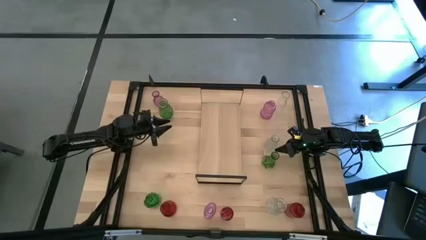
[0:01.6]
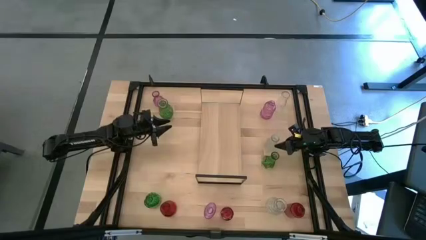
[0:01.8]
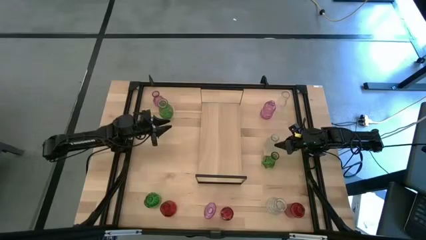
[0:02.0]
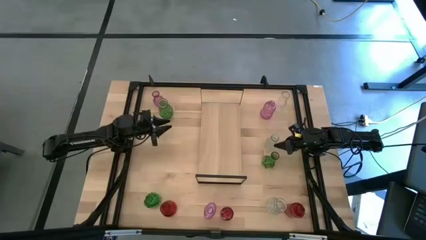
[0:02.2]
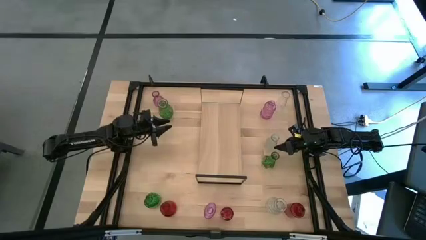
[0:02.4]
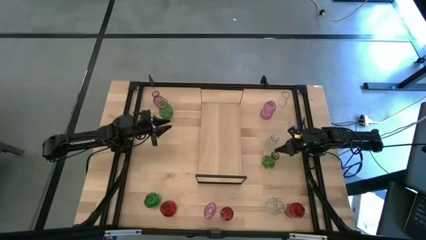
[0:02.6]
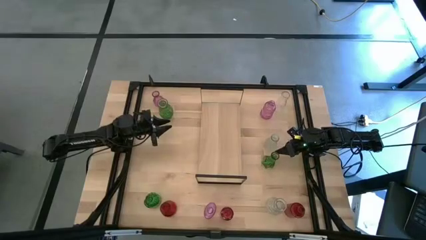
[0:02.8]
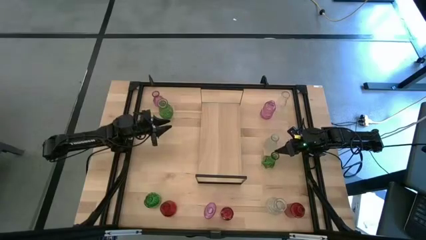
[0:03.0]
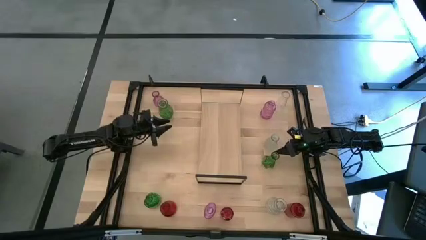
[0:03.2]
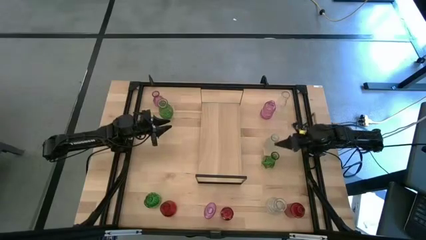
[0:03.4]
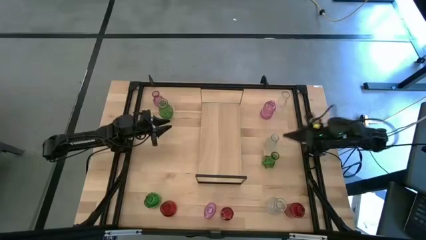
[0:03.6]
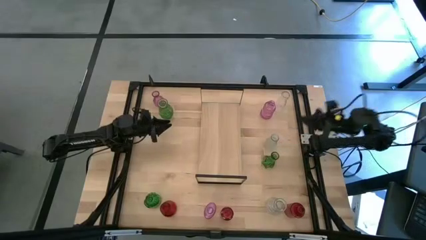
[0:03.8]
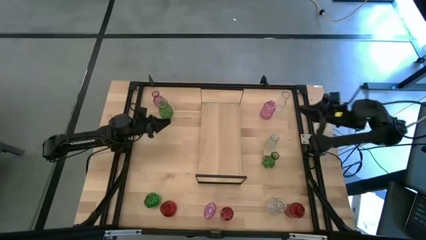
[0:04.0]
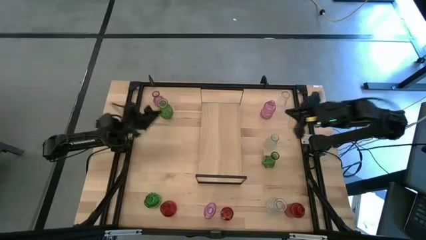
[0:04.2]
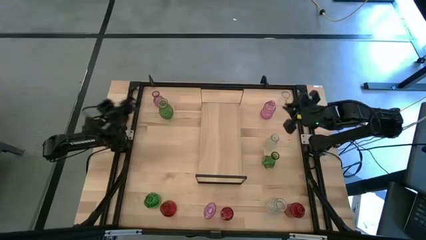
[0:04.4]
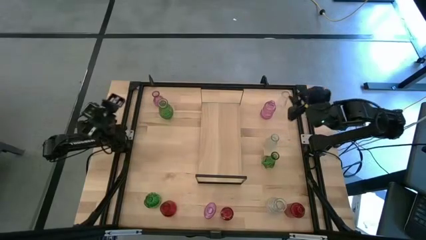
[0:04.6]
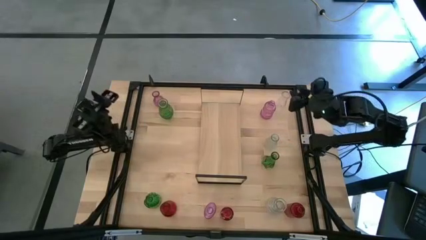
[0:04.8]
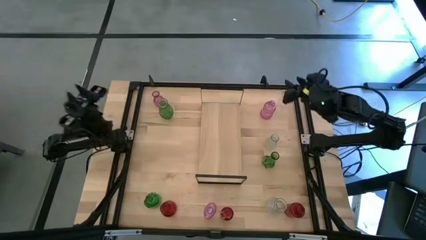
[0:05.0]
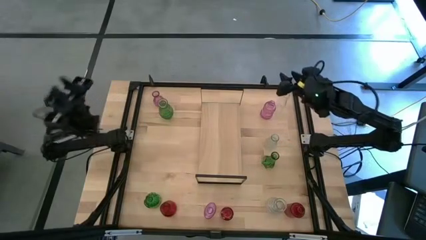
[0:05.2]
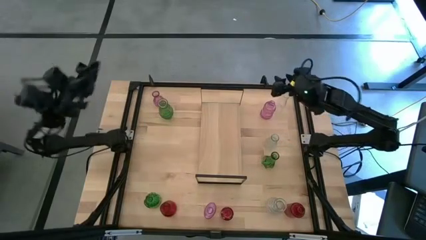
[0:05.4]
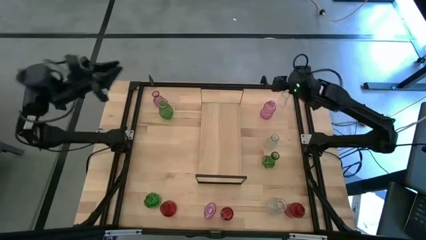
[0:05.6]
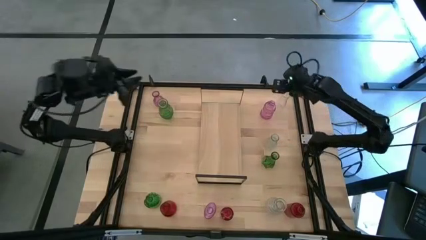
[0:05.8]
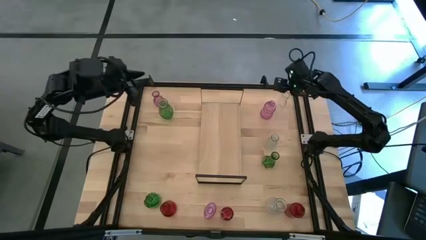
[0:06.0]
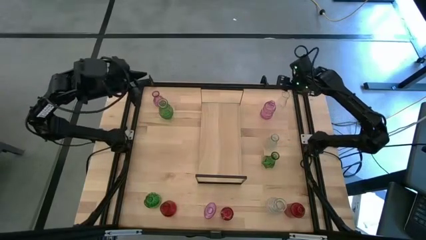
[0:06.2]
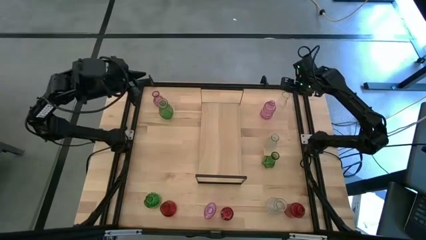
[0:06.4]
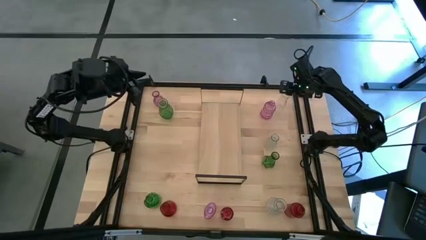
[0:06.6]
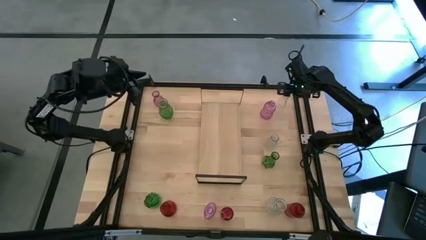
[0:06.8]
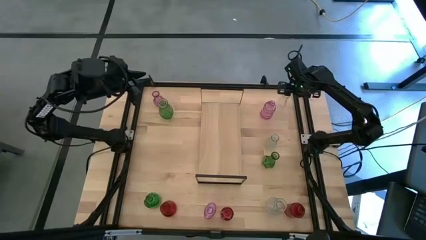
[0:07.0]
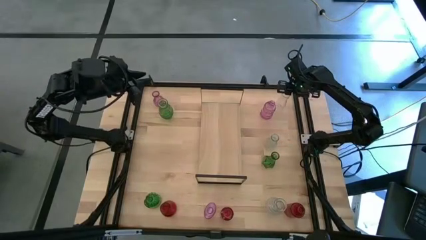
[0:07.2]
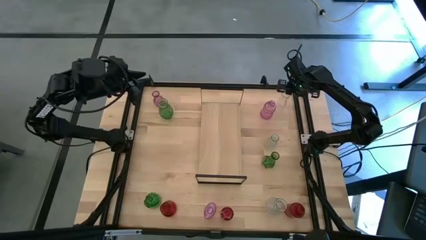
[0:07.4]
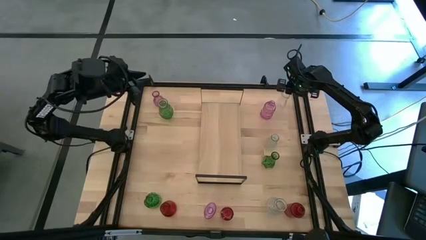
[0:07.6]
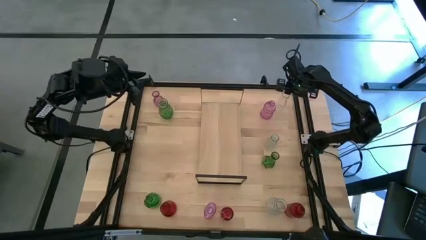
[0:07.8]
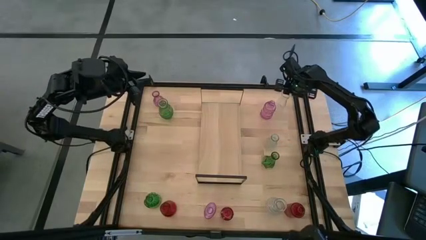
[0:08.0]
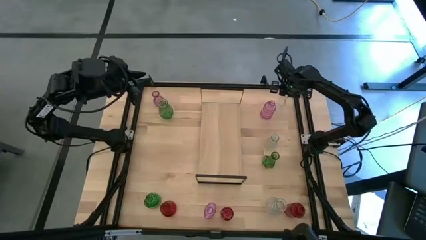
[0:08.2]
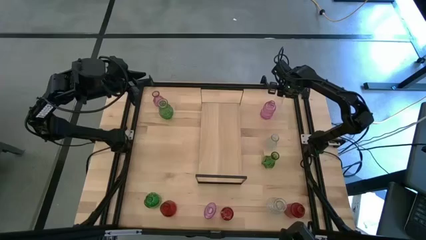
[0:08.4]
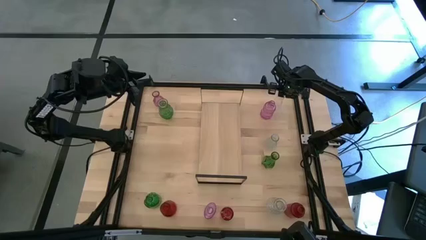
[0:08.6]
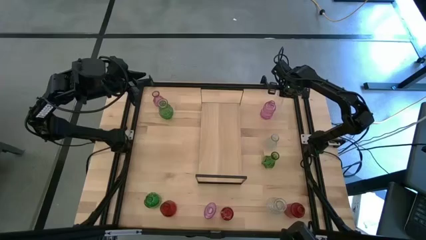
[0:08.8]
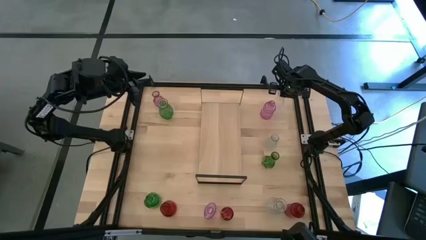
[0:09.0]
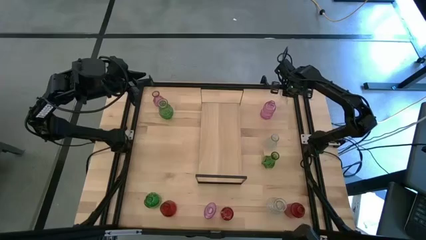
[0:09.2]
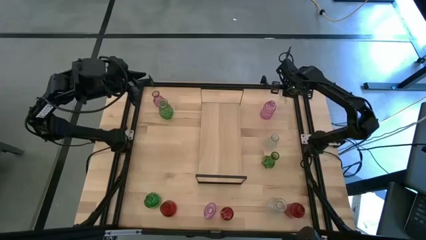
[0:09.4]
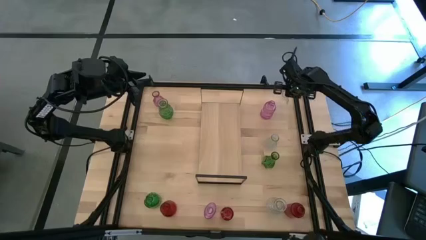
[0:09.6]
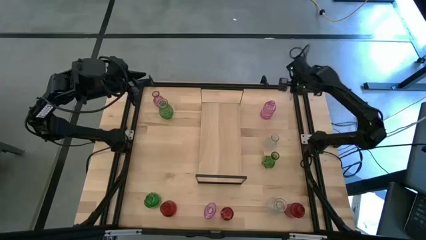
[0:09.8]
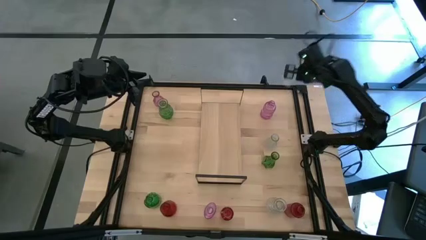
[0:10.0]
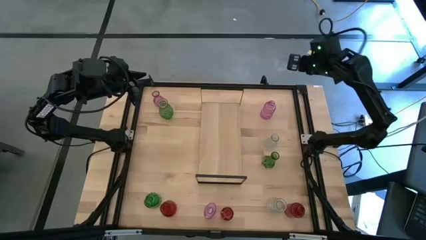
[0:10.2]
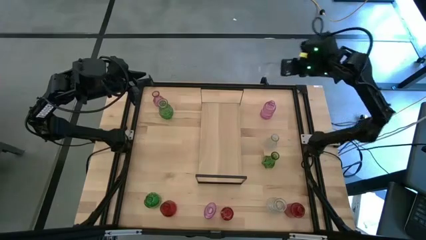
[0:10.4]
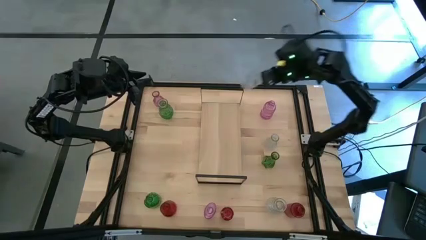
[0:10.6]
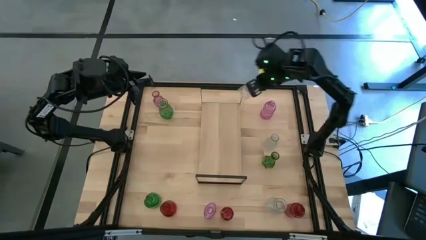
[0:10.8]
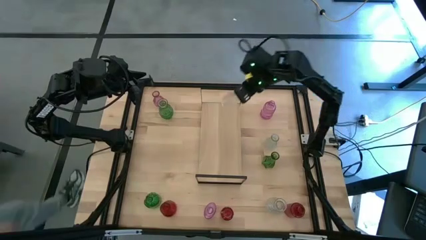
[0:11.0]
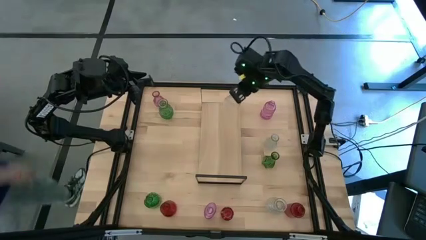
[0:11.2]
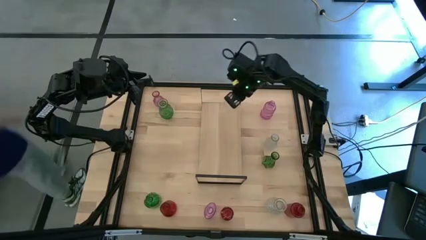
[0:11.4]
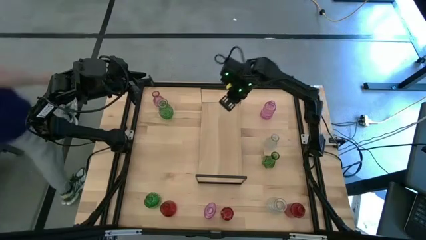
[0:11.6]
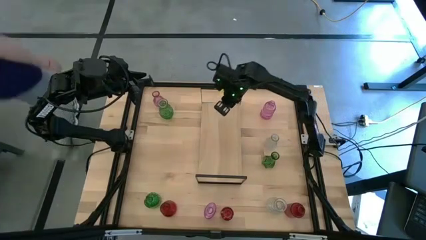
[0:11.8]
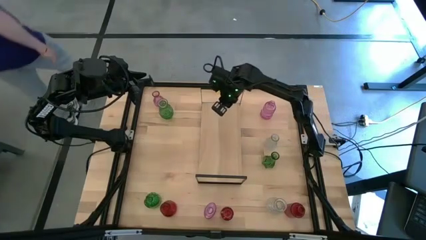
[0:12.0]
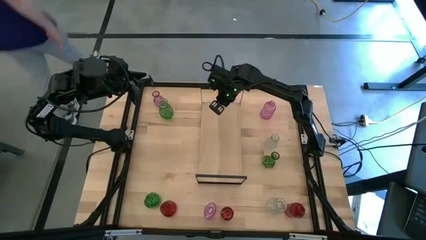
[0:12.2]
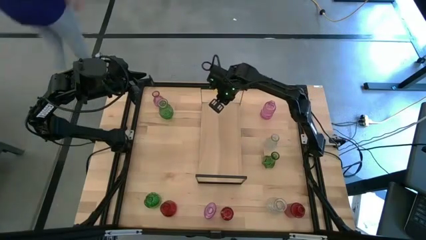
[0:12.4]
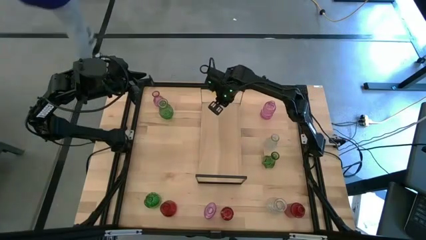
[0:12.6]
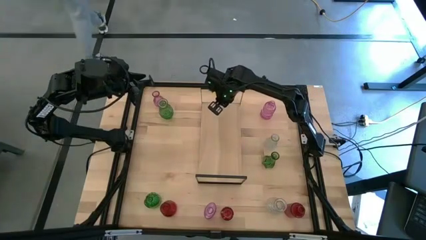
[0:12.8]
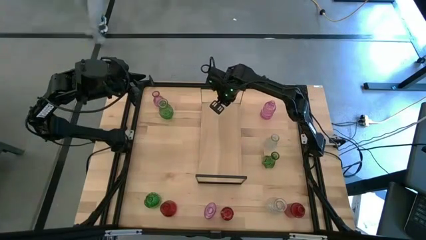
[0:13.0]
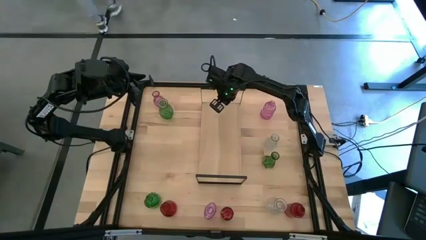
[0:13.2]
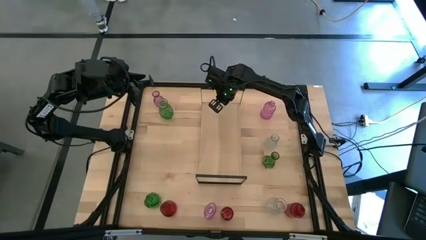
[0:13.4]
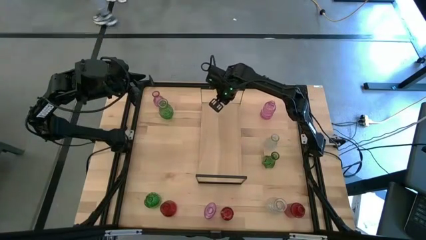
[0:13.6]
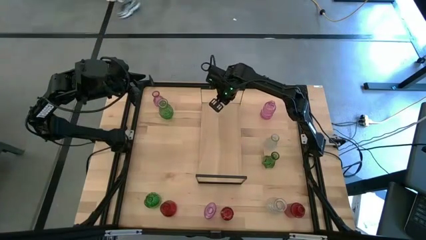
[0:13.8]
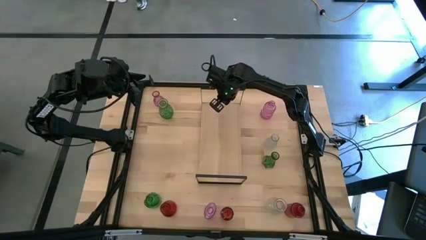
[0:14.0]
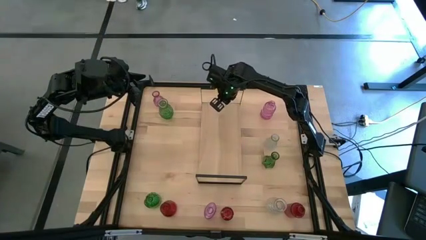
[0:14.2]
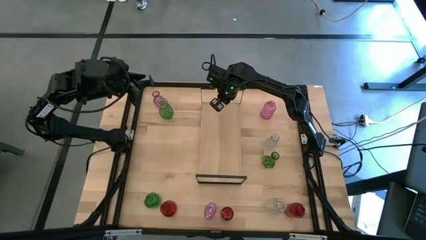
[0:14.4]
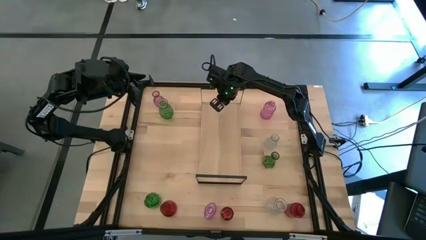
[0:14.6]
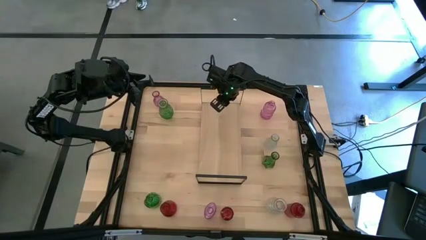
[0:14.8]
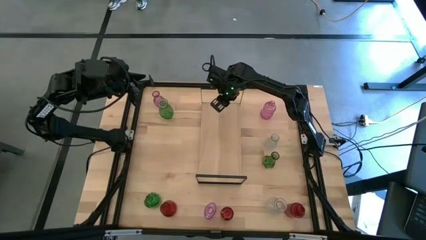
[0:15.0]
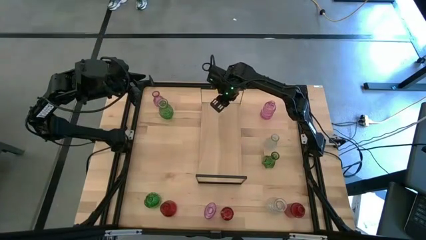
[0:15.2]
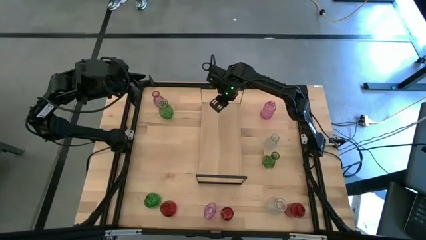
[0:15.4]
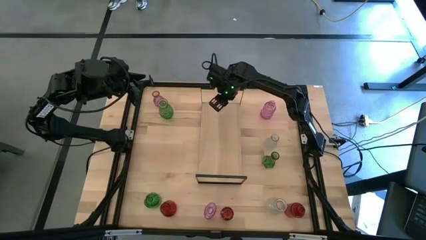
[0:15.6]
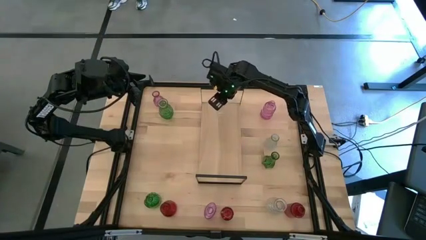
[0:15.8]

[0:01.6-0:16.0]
Task: sort vases onto shelf
Put the top transparent vase on the shelf
